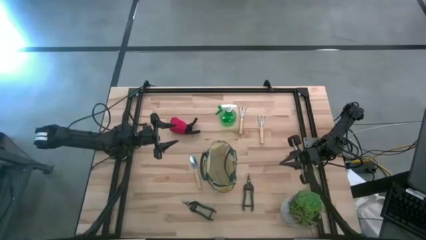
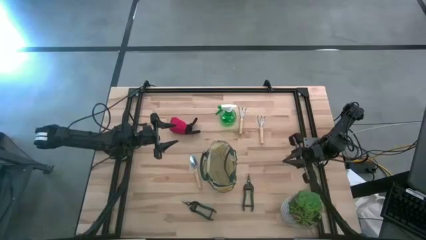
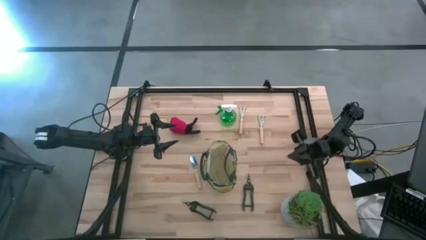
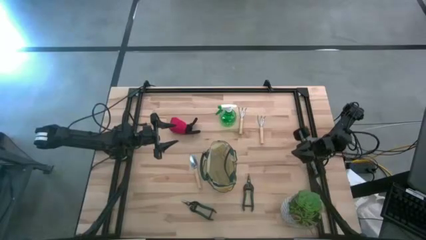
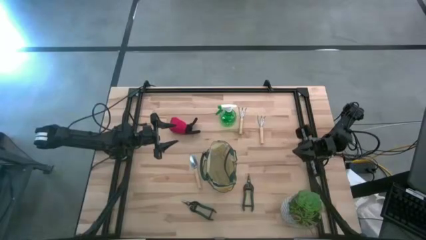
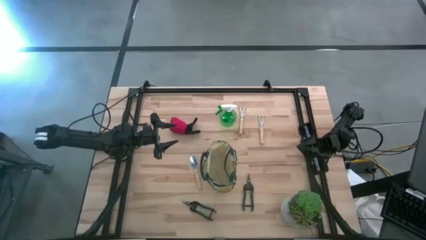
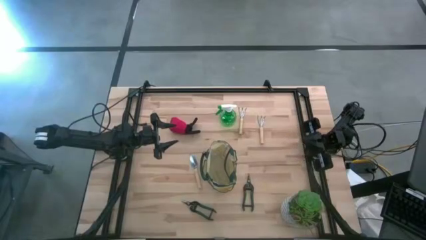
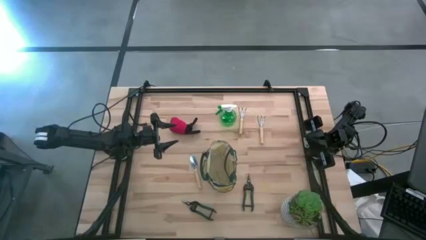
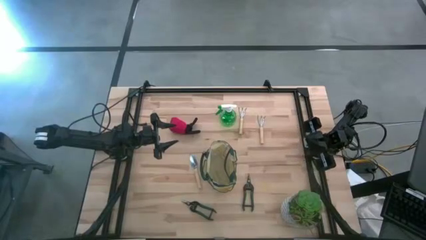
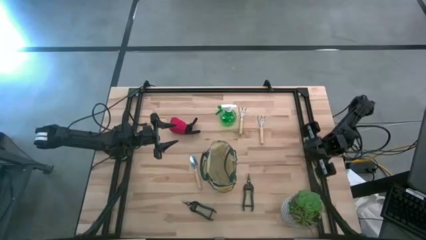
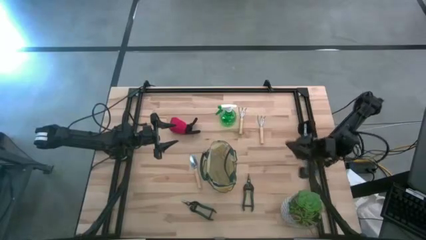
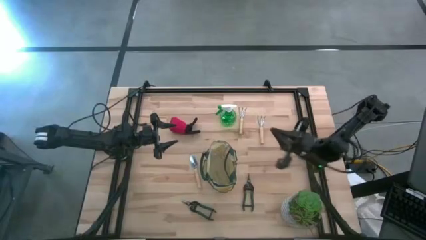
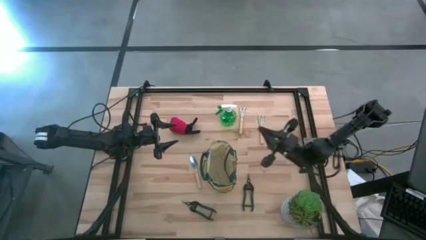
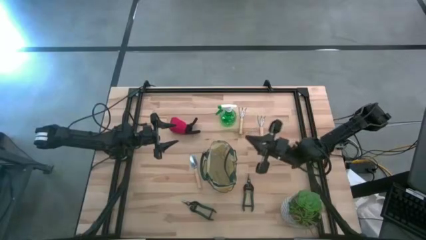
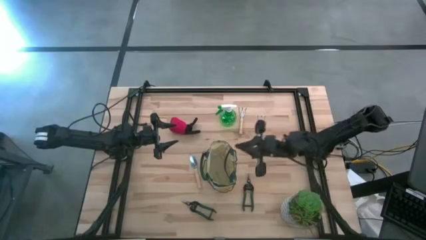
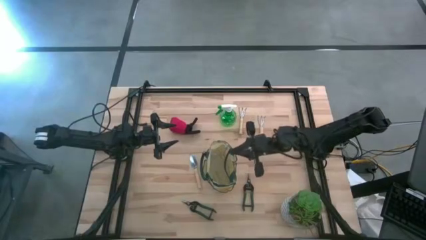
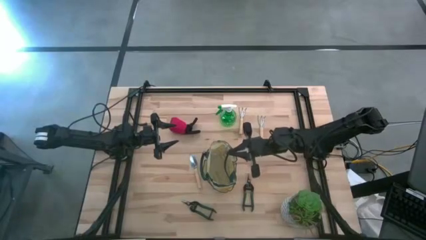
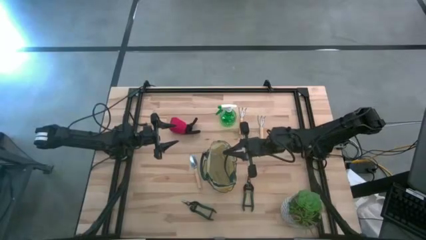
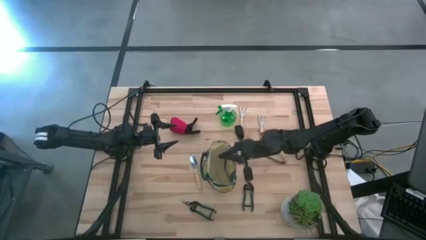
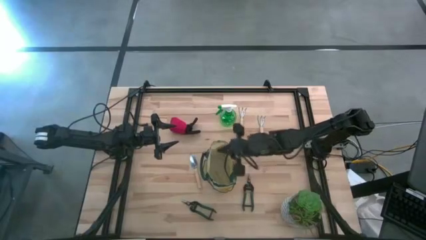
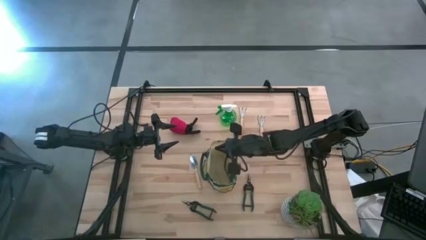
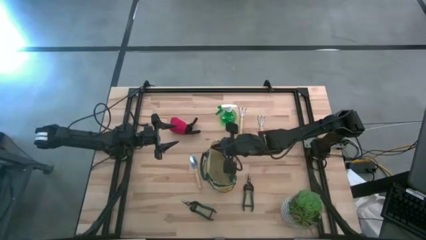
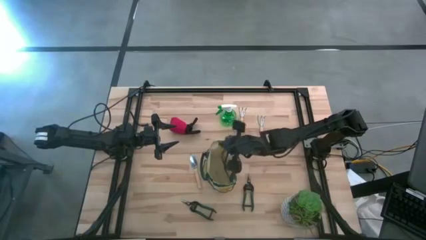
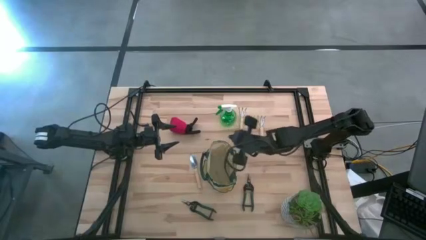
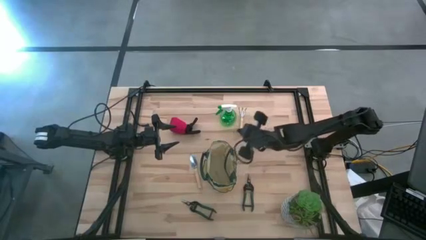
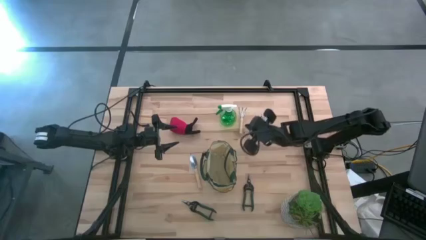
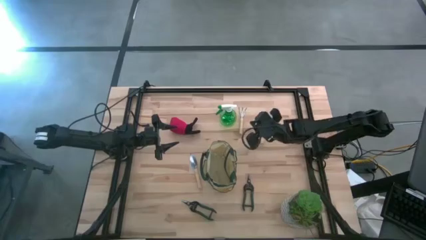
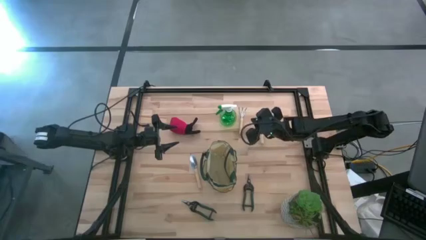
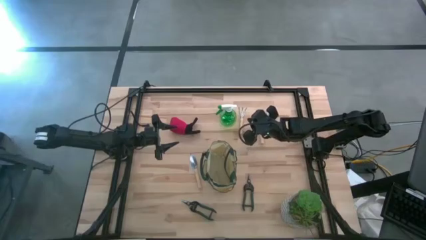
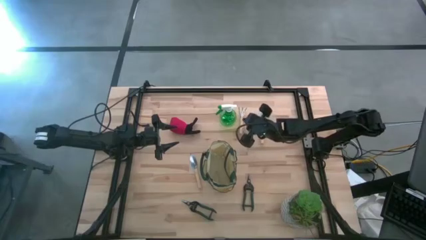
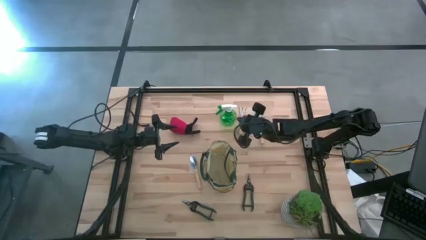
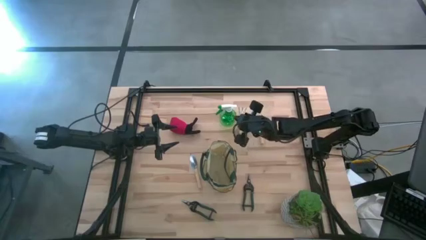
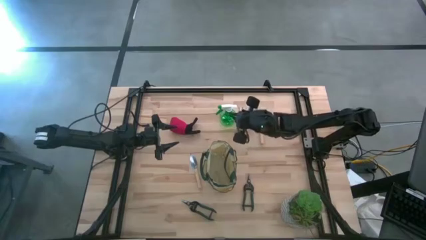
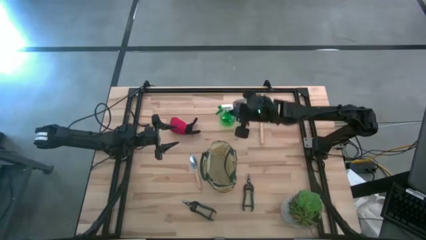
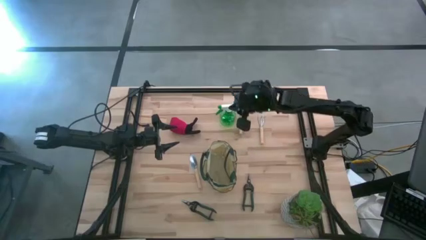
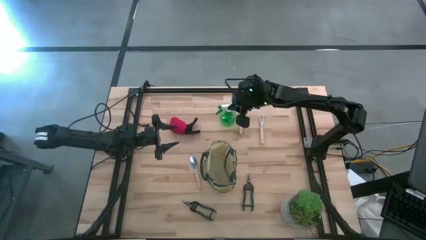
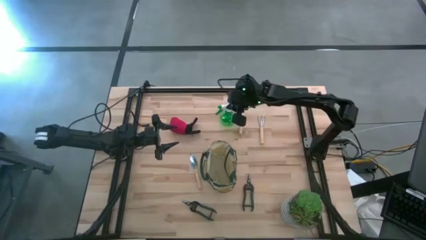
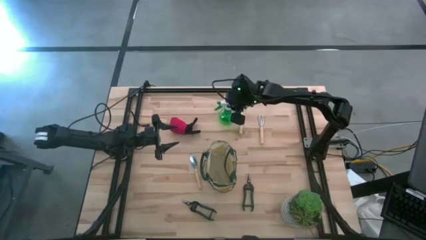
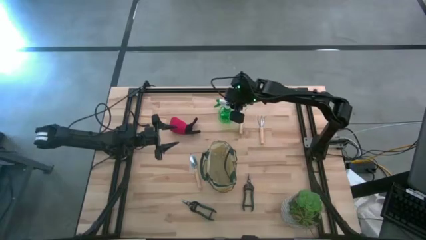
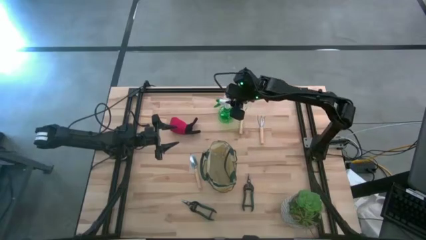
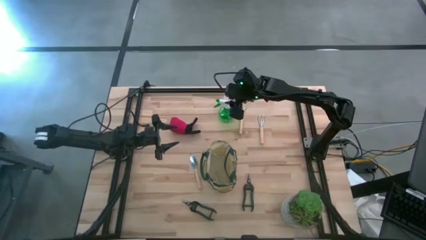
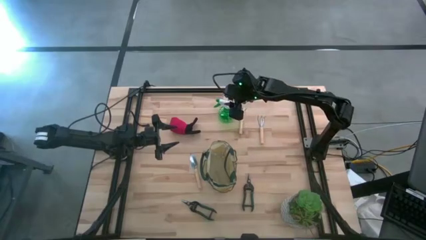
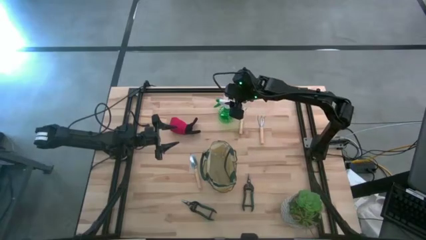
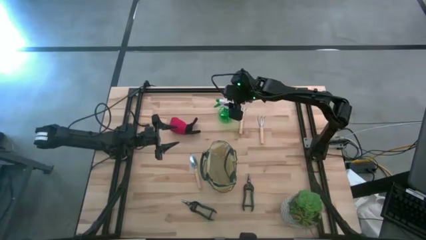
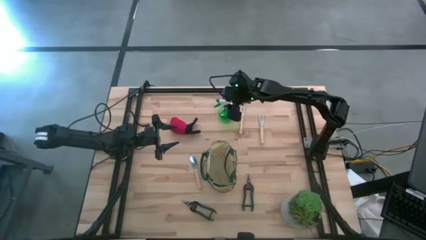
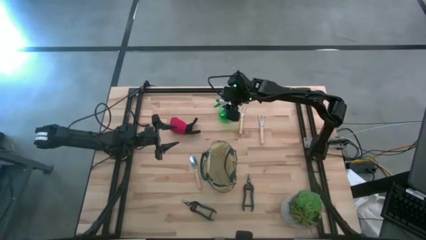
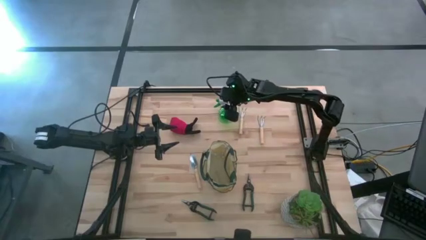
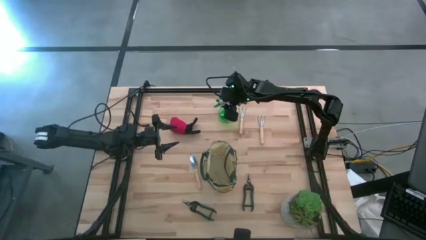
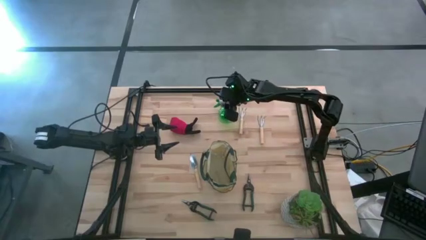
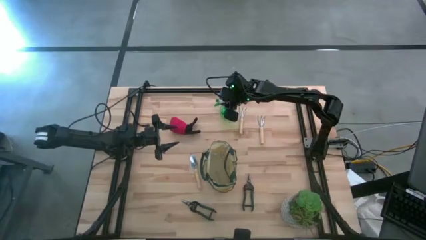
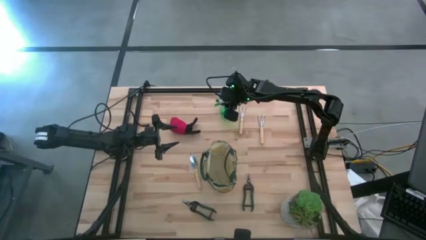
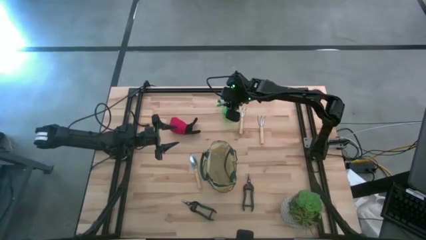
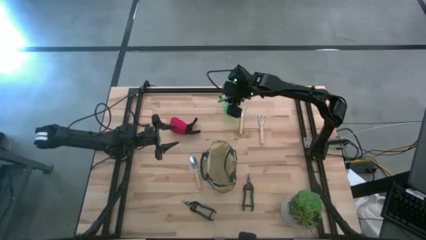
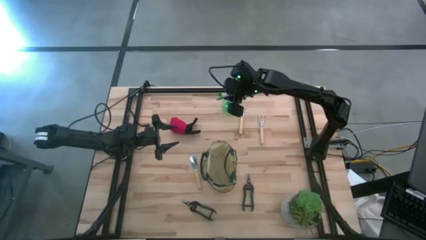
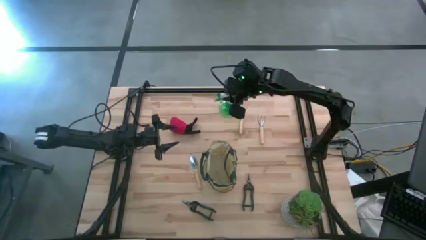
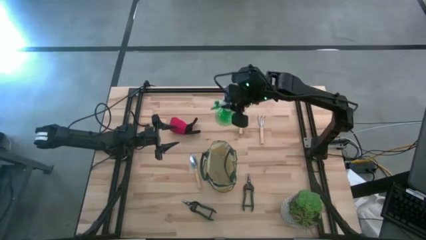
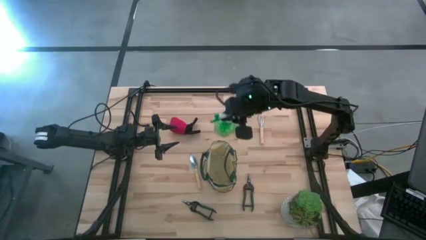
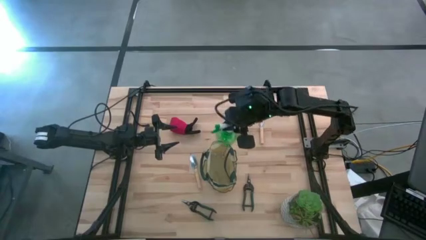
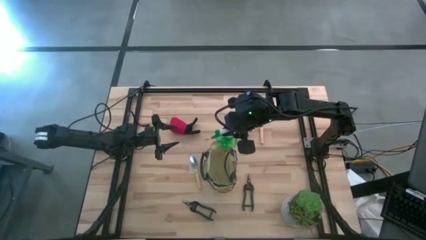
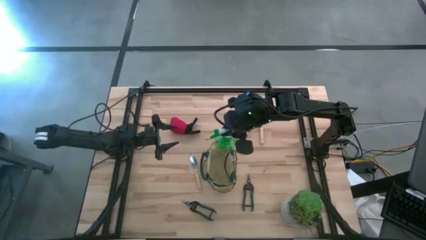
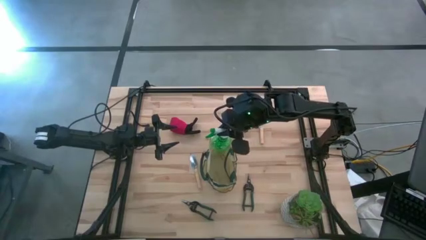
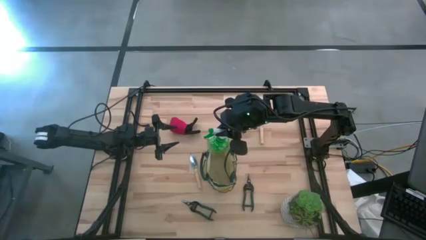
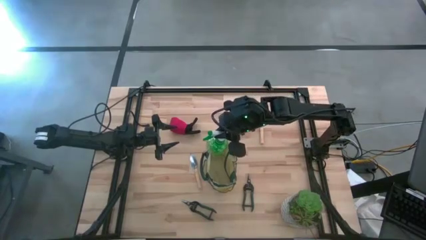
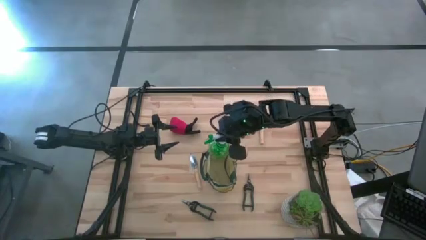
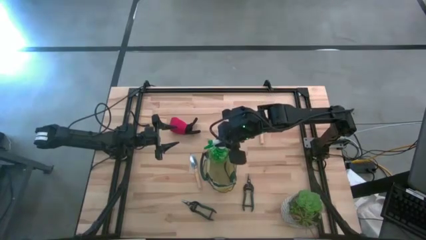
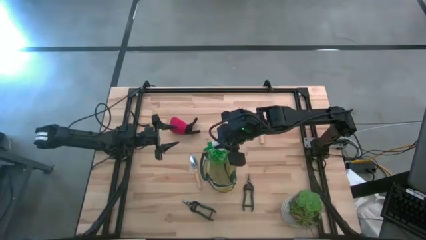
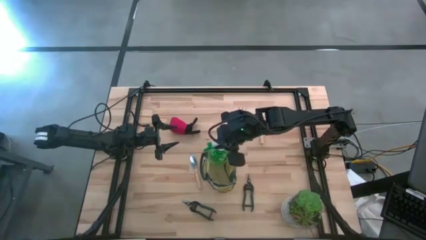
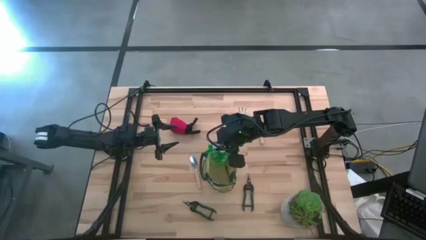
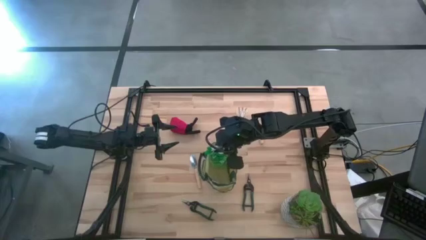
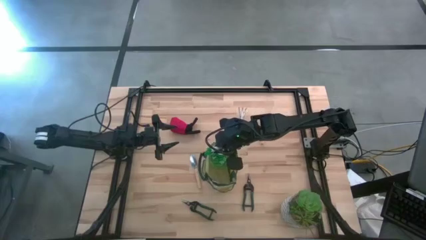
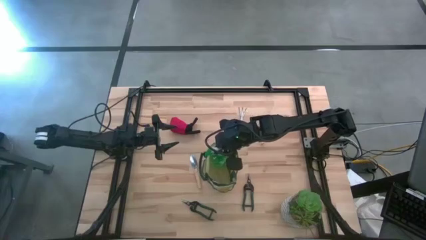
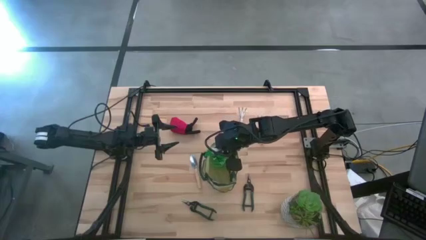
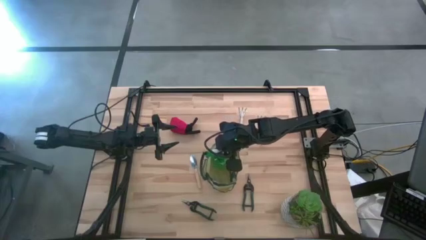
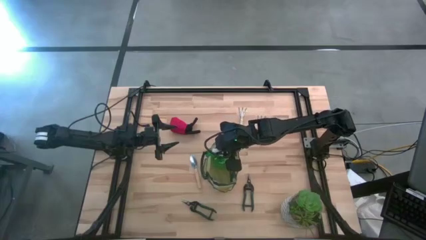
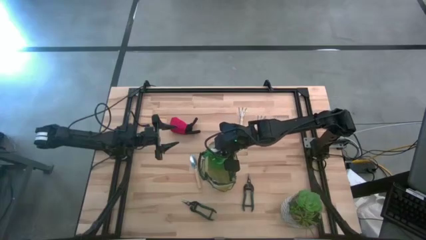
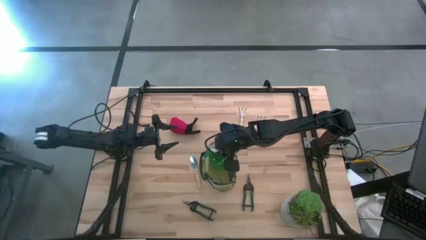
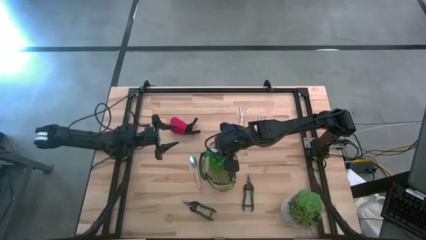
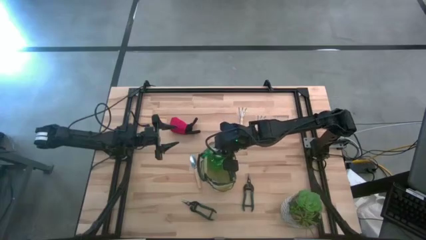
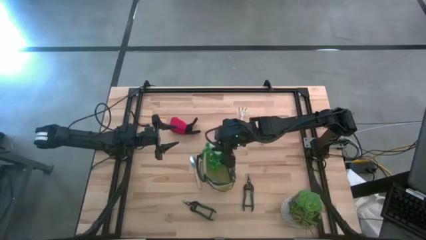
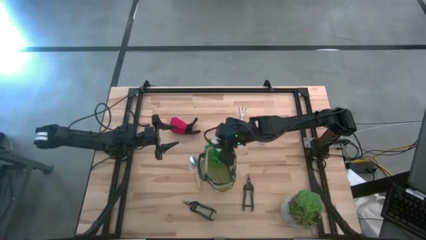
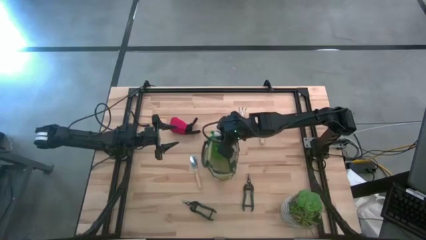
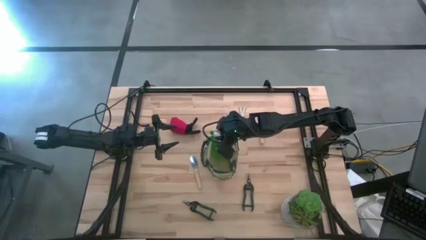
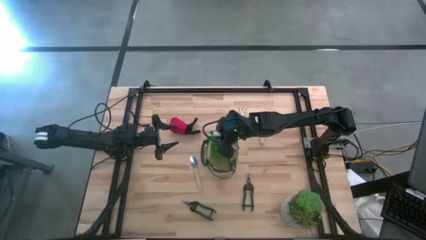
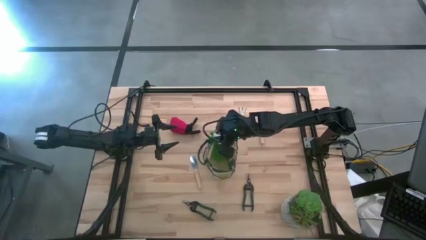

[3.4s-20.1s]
Task: Pick & Place Garden tools in Gardening bag
Put the green spray bottle into the white gardening bag
